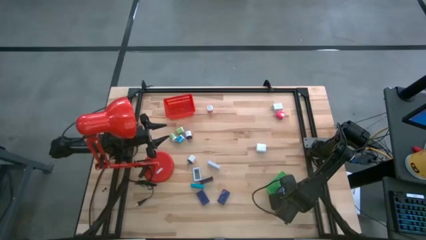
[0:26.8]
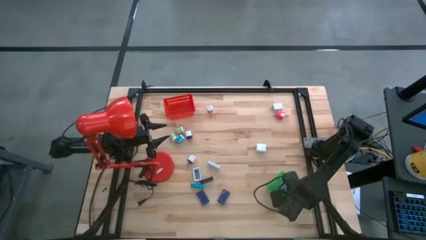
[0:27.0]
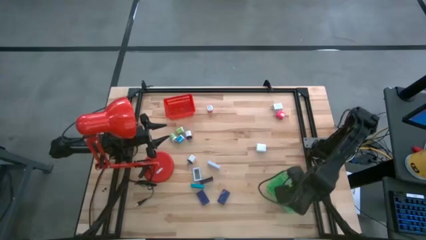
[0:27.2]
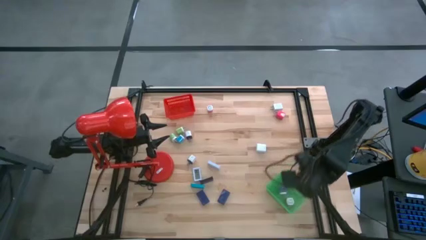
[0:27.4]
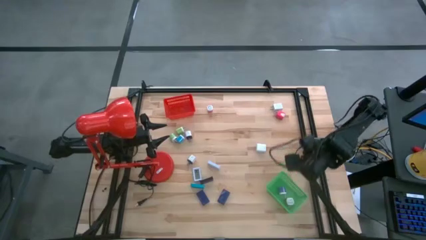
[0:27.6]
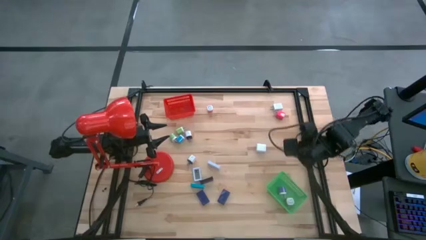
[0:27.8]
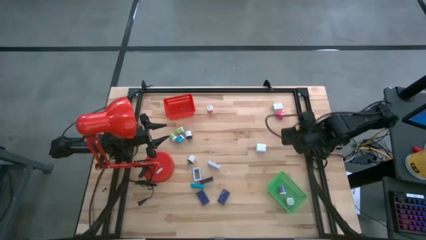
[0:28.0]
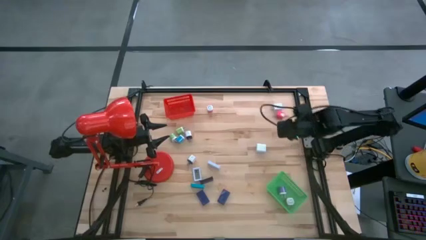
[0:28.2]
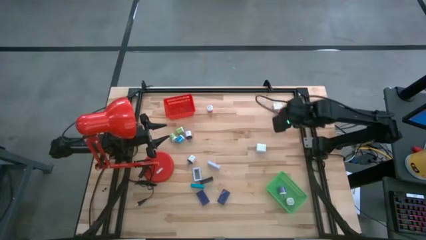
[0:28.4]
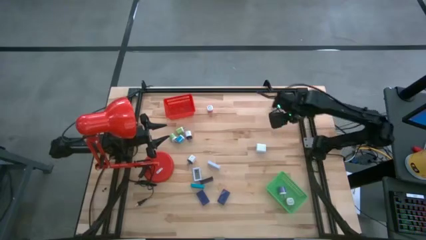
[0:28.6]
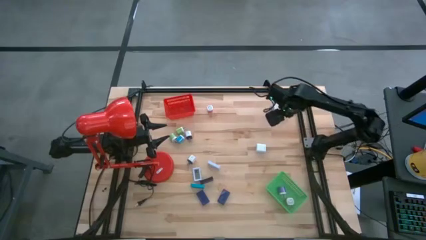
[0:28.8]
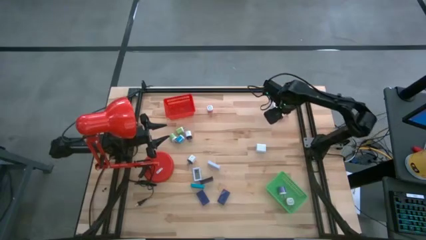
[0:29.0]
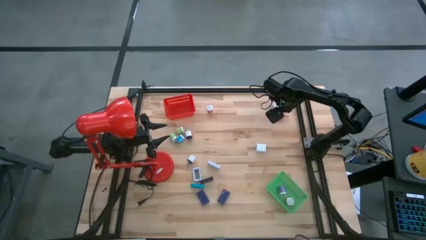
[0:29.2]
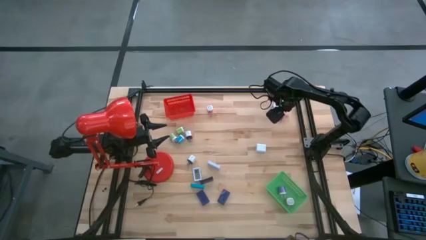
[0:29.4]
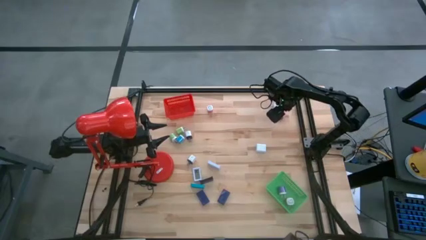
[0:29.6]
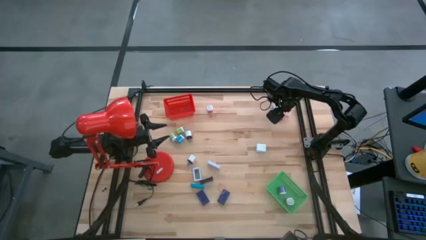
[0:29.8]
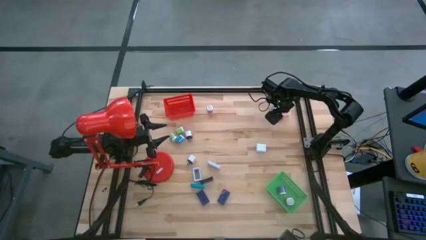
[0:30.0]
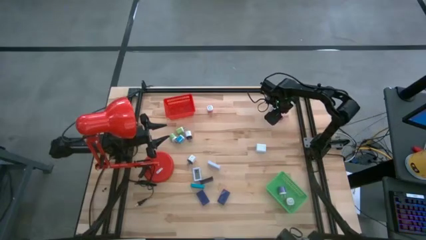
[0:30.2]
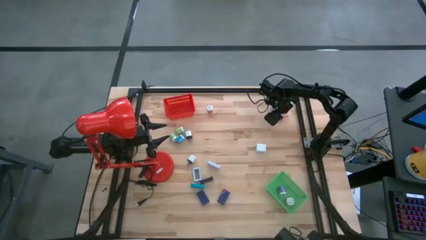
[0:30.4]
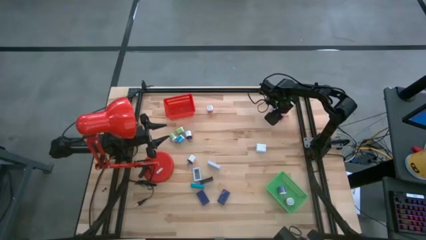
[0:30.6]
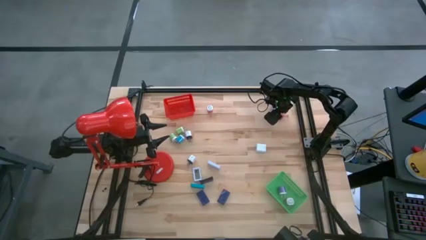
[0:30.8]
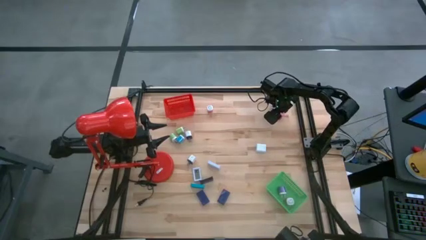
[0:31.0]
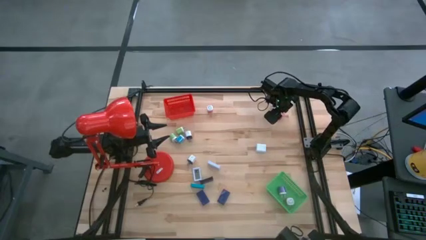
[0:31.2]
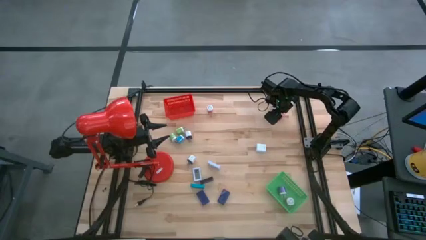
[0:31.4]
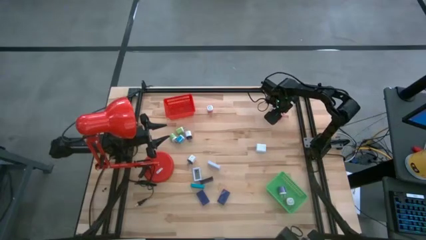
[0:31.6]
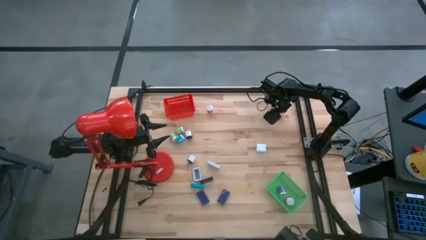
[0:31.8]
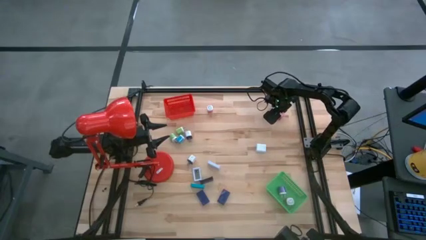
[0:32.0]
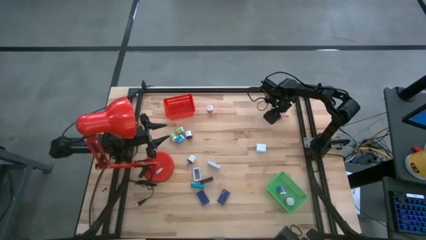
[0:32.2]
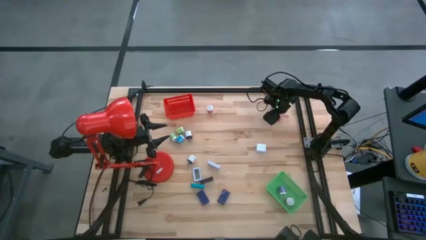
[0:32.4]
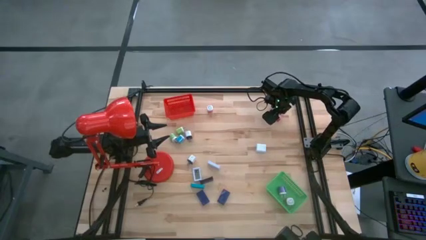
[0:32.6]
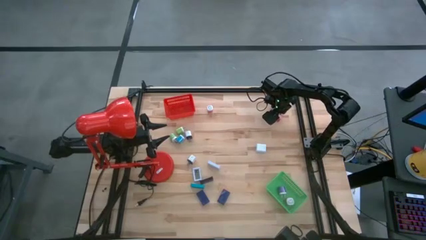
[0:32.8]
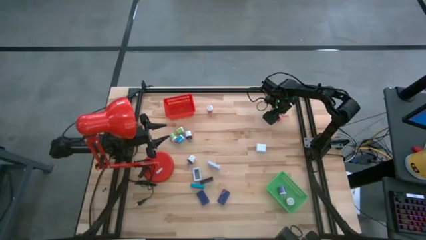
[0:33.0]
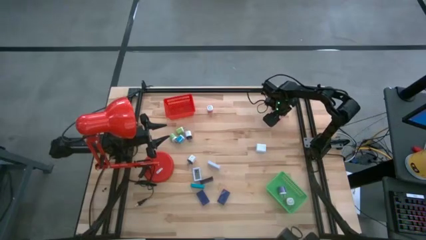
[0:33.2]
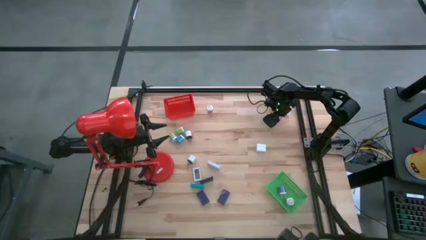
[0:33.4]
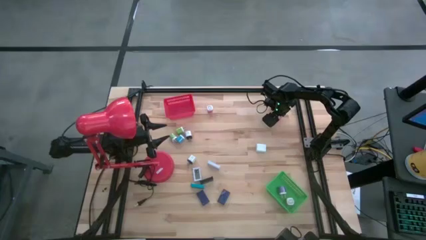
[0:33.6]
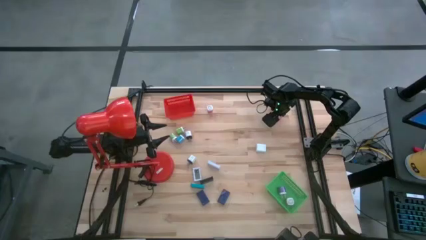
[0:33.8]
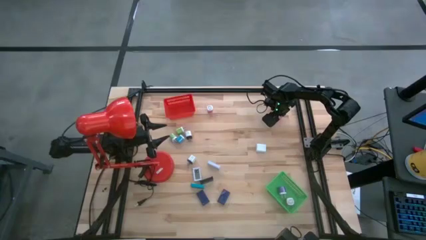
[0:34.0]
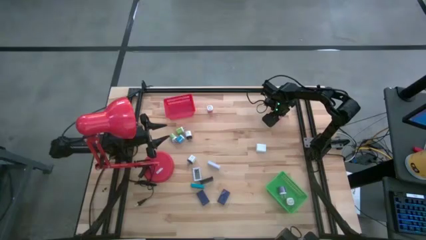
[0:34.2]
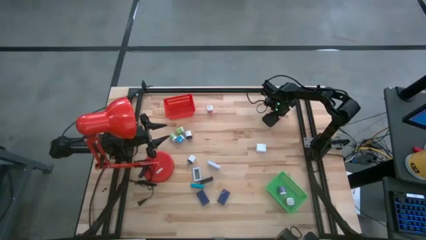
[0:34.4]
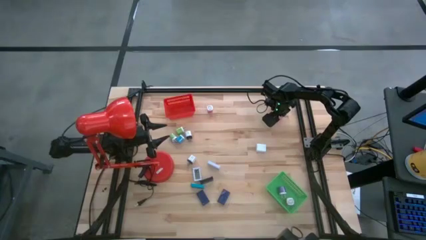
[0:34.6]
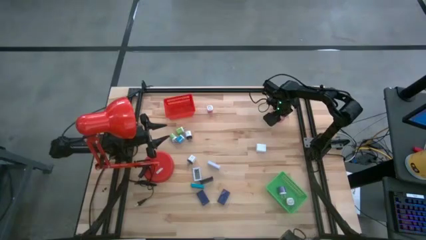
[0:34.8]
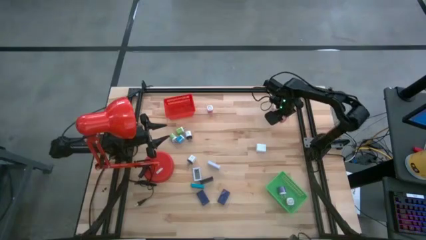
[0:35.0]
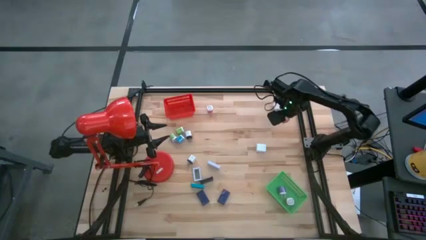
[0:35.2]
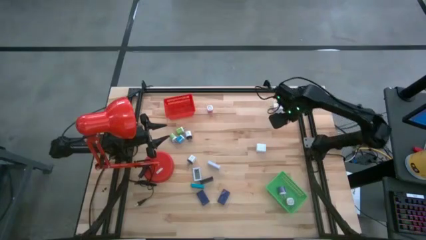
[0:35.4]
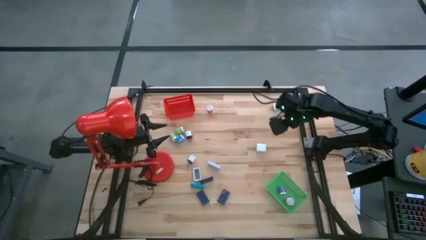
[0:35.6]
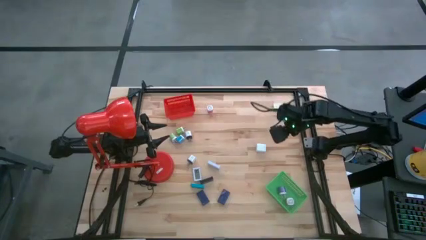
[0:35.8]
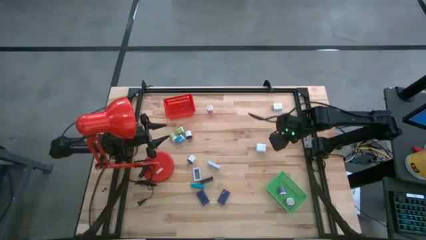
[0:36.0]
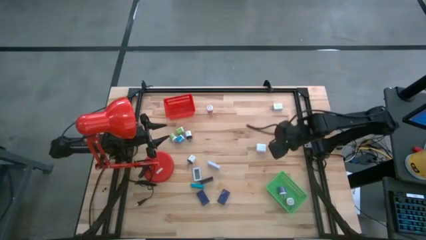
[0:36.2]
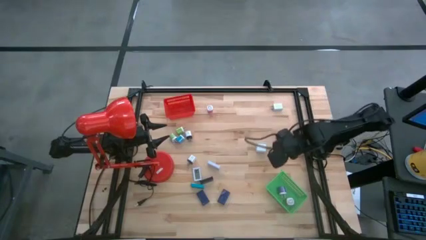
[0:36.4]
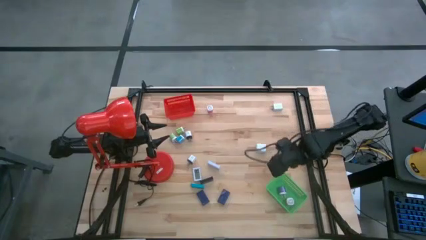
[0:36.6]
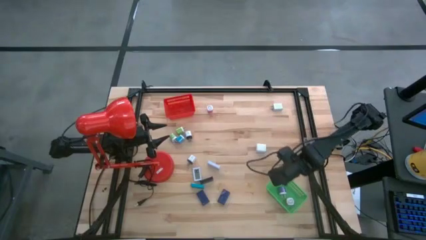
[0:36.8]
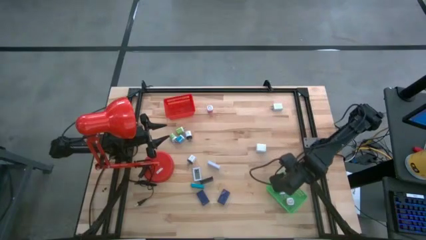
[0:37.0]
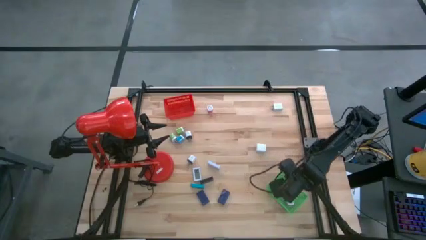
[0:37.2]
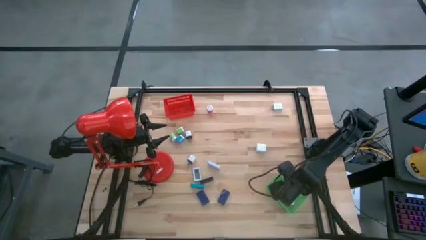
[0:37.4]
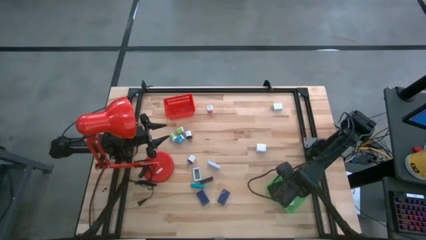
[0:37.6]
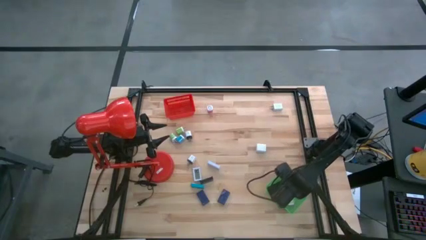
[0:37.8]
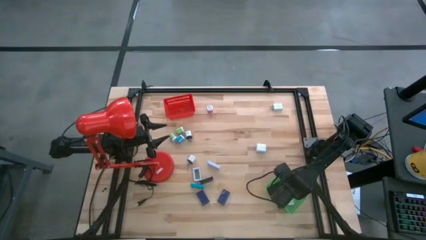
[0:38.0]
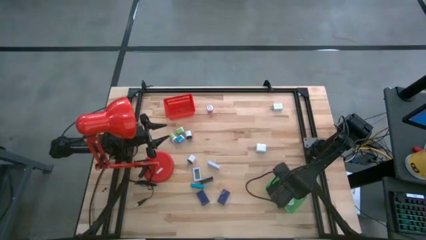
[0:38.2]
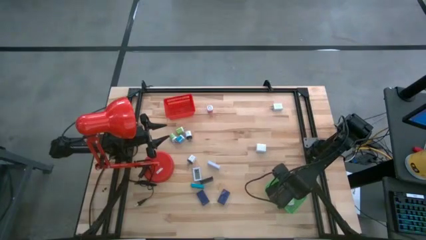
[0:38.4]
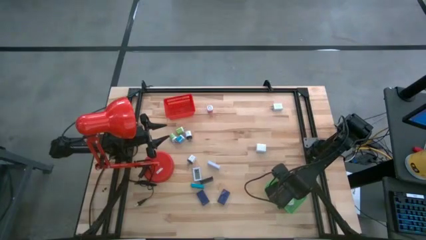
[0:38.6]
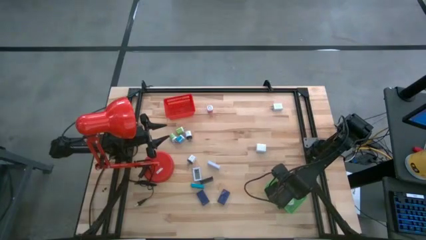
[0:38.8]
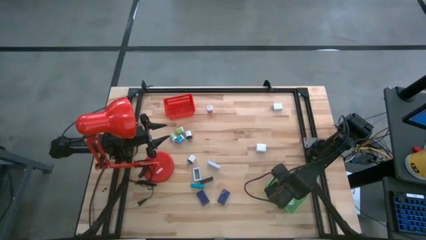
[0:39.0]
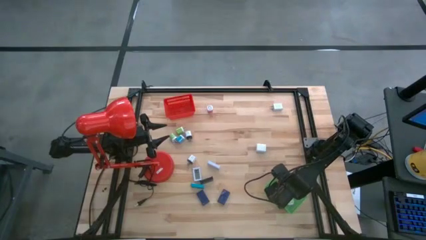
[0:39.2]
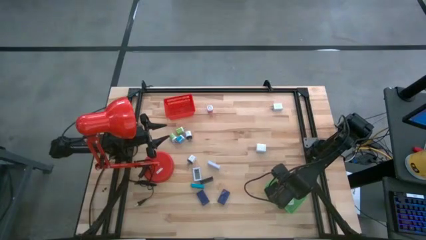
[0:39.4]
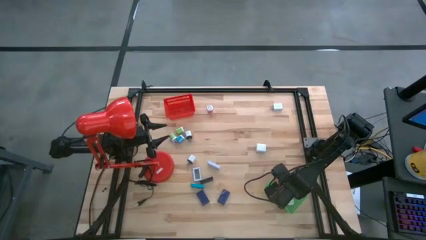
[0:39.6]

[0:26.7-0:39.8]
Task: Pick & Place Office items
Put the pink charger adapter into the green bin
